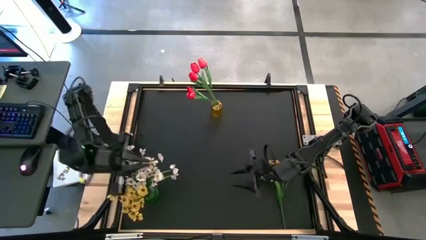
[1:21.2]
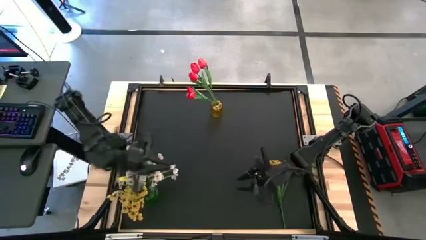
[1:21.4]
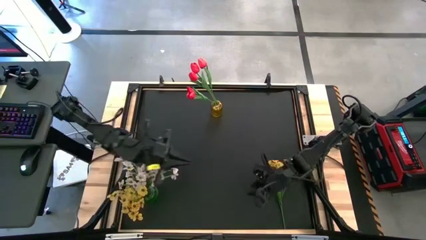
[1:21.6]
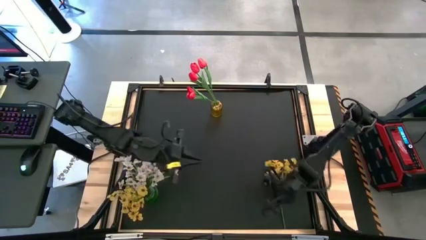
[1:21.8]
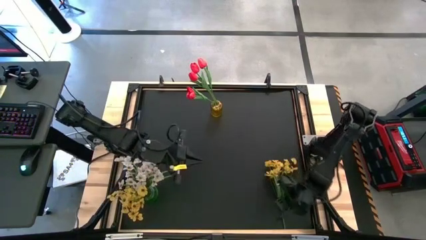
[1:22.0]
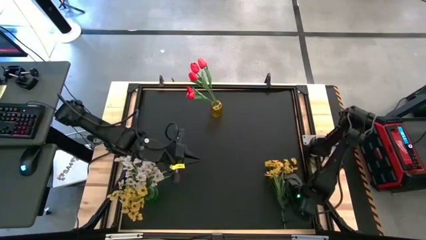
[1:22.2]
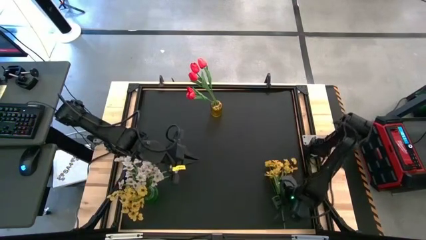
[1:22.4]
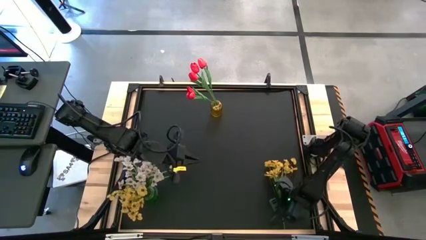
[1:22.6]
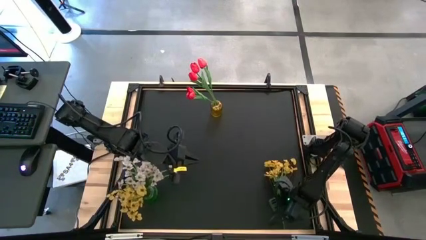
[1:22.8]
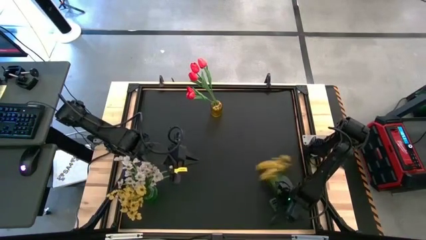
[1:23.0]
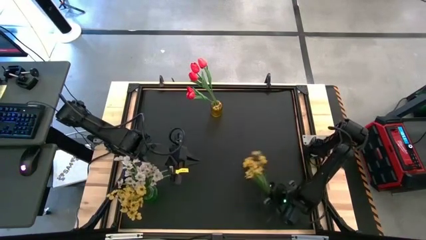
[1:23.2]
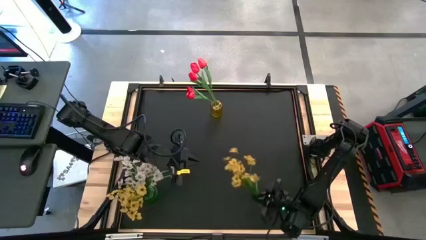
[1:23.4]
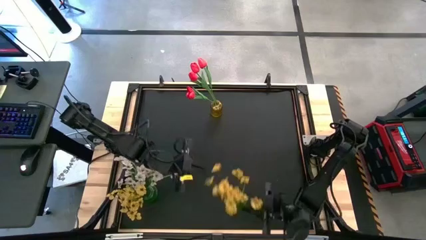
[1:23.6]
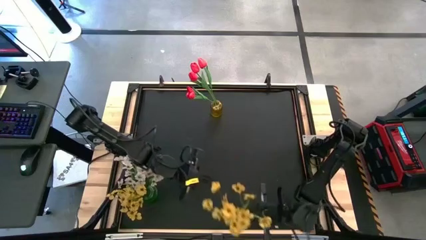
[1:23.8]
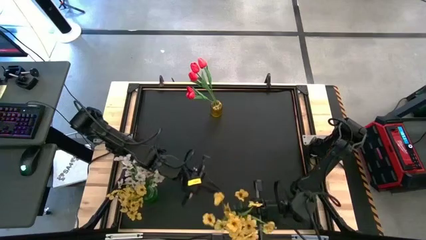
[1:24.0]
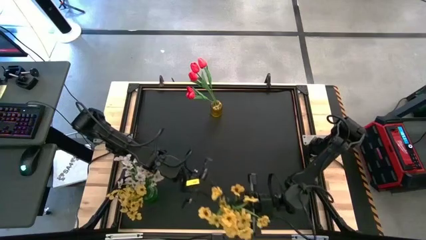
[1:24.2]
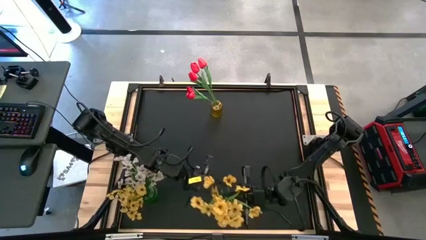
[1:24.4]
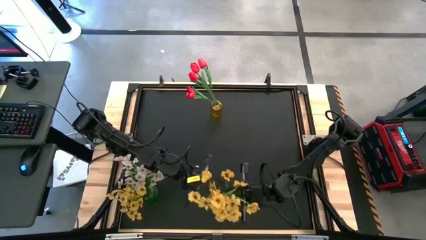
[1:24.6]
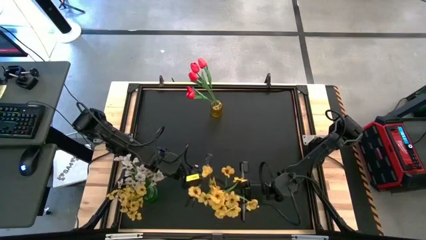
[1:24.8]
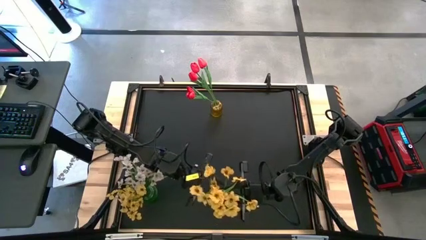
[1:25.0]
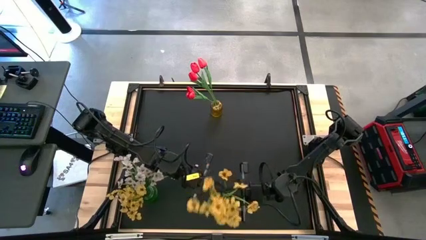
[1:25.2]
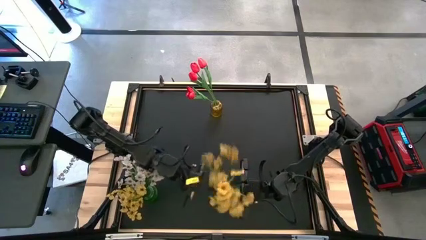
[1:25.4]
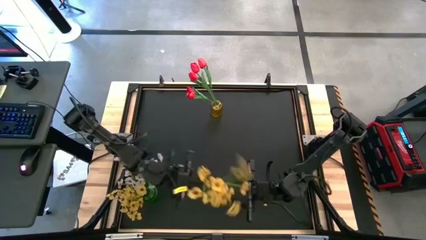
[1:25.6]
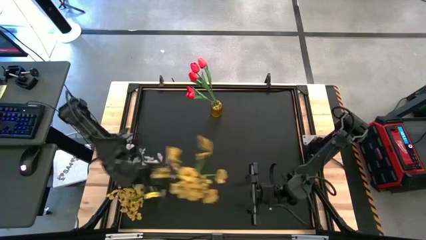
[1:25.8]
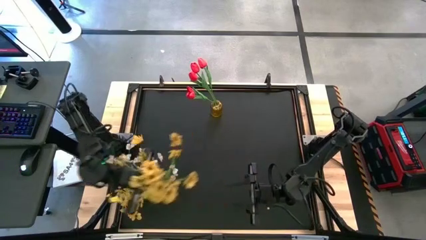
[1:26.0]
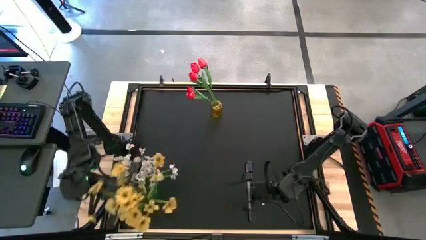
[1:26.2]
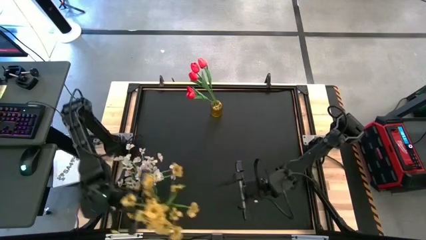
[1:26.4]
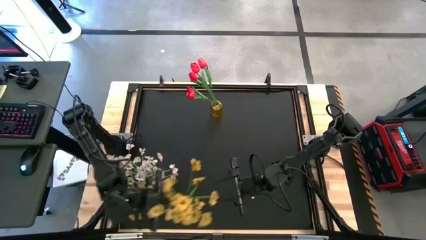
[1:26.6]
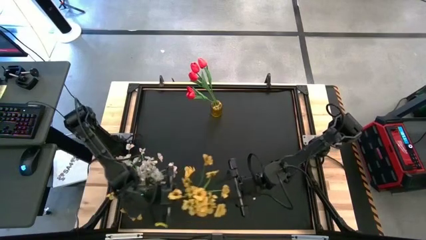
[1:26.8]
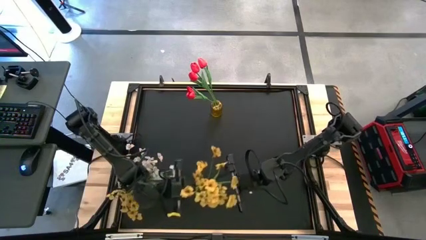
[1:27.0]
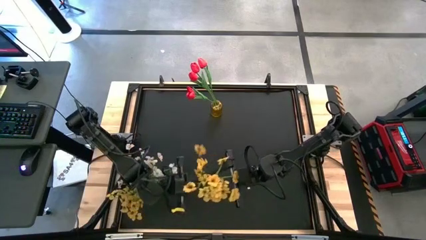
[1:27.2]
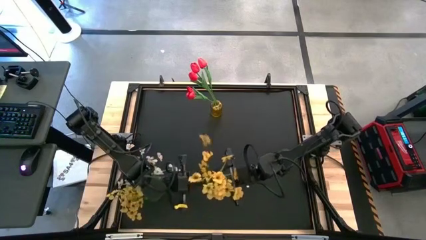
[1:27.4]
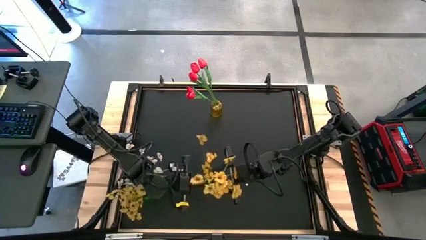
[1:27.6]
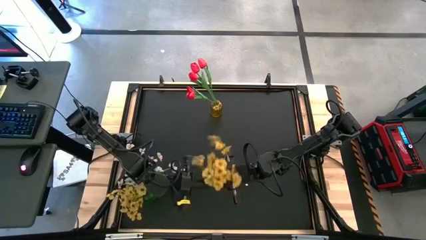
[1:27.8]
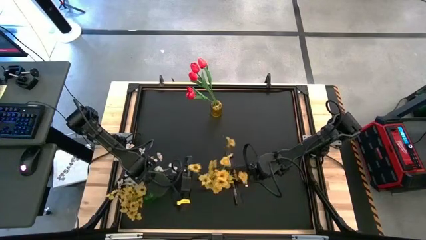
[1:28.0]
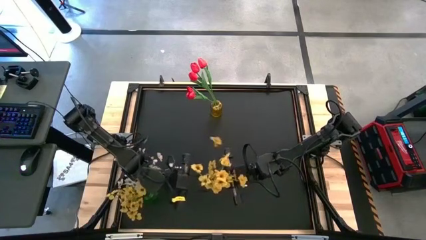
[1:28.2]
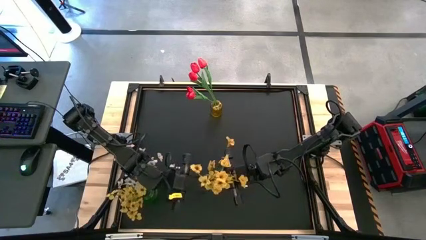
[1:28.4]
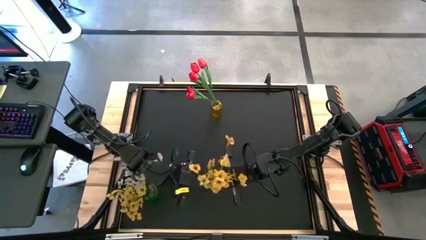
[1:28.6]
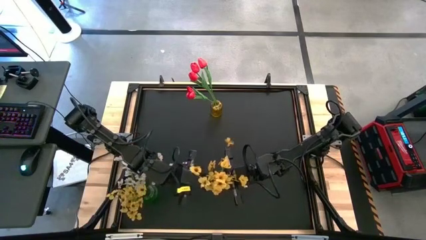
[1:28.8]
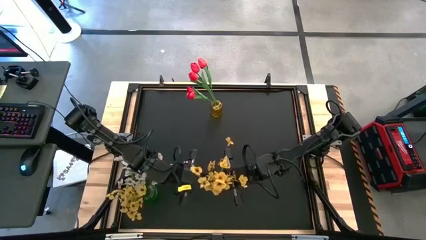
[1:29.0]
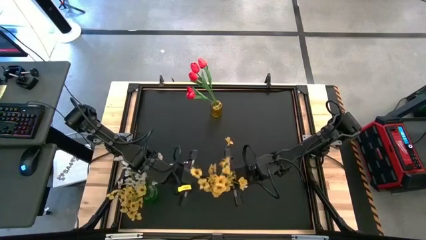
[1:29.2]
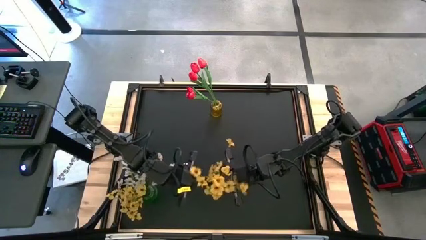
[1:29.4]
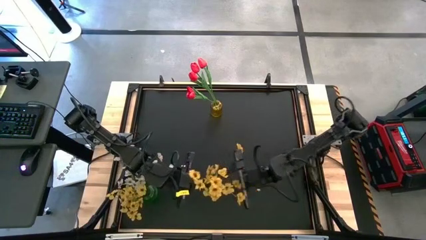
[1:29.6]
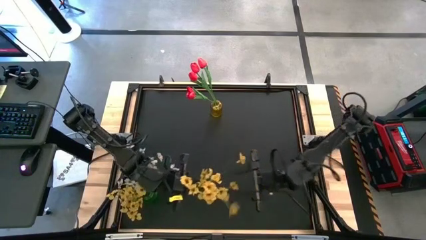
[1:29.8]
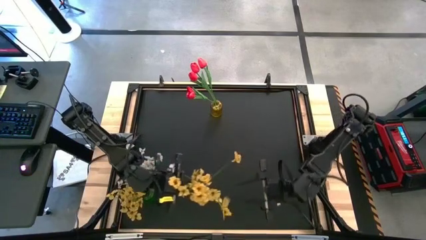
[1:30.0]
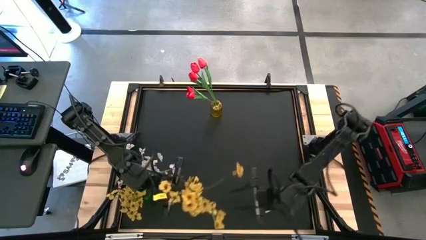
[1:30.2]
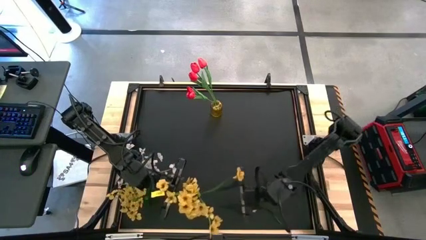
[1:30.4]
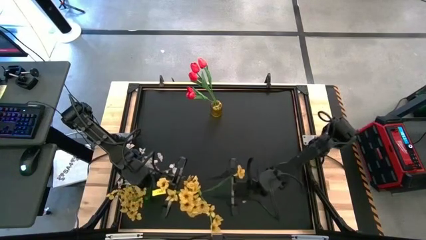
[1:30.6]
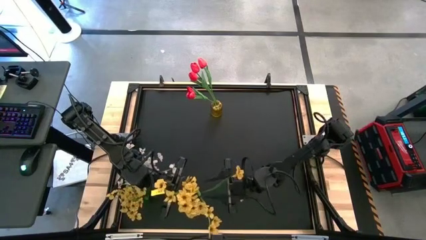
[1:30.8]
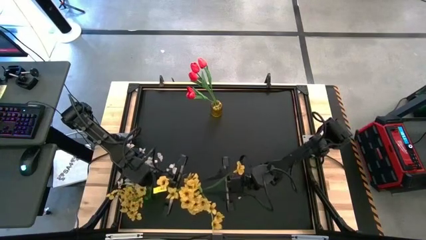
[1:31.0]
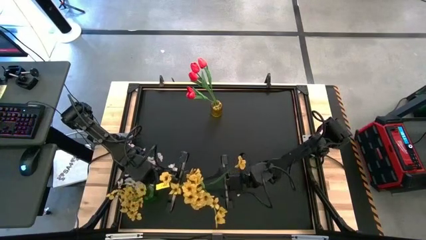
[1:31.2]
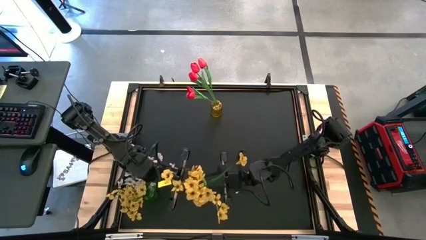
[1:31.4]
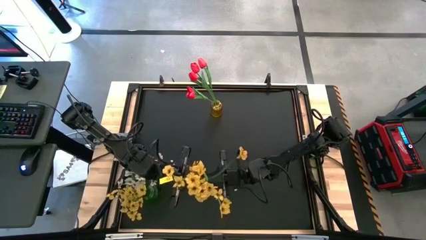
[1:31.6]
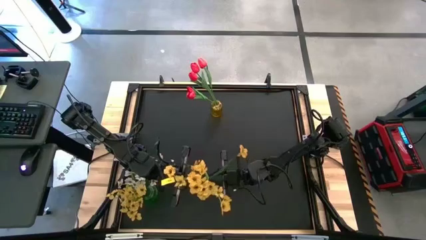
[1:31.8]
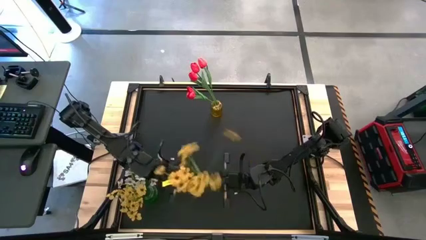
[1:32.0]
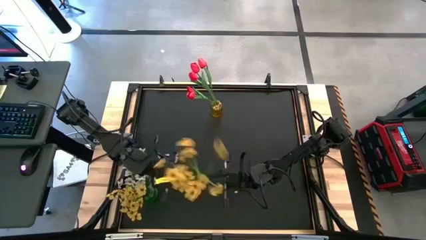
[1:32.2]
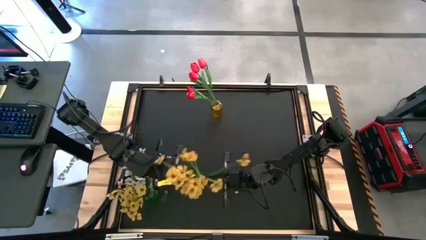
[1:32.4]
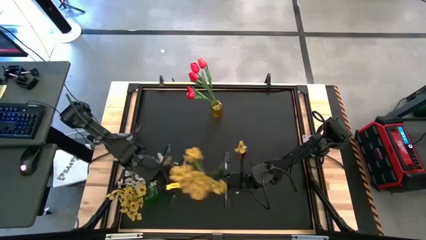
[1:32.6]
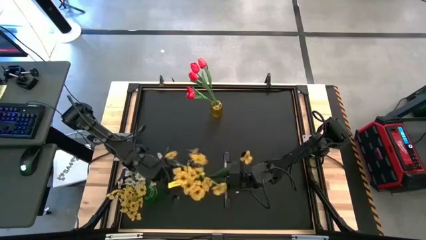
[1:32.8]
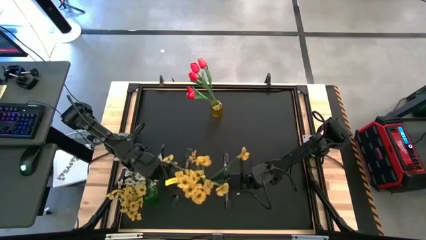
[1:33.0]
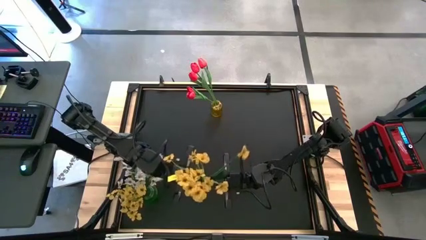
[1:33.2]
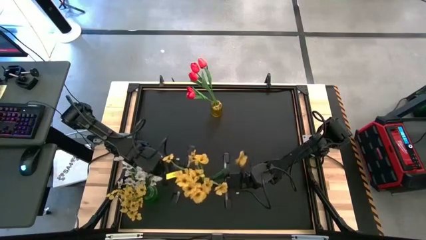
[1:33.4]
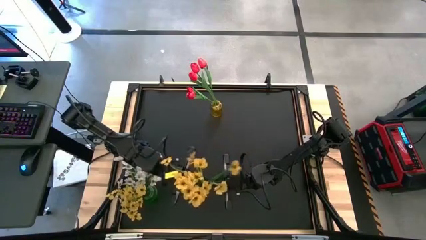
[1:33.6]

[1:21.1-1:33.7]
Task: Sort flowers into vase by color
Put the yellow flowers into the green vase

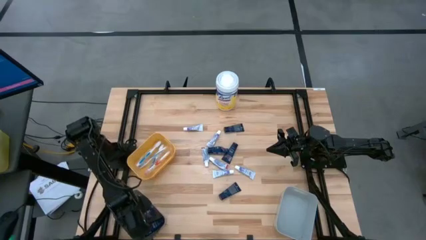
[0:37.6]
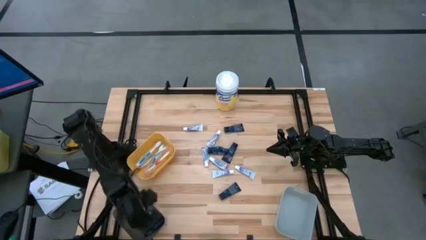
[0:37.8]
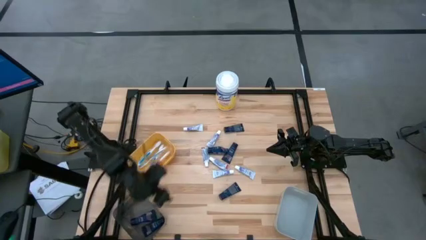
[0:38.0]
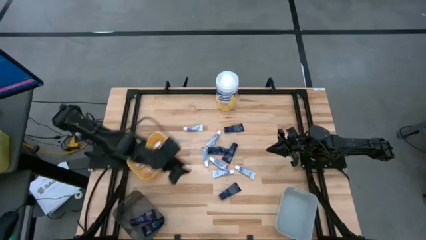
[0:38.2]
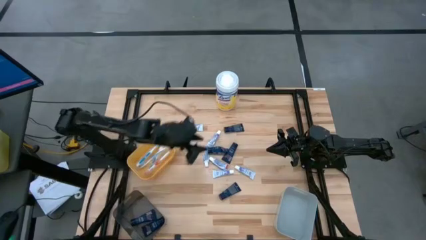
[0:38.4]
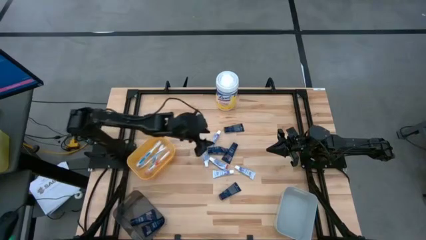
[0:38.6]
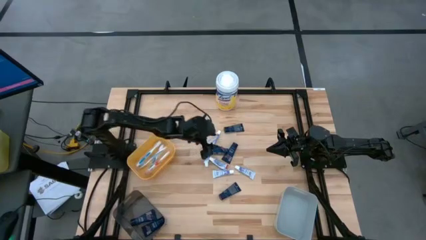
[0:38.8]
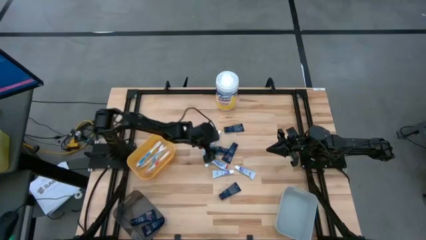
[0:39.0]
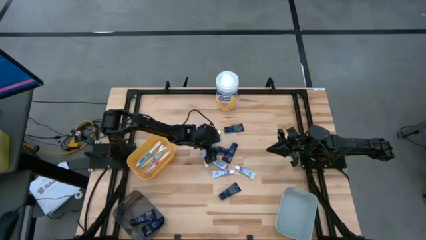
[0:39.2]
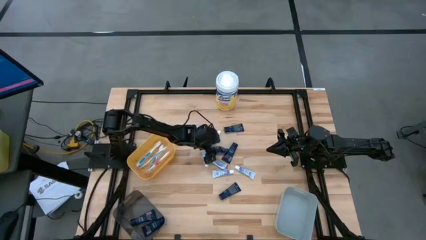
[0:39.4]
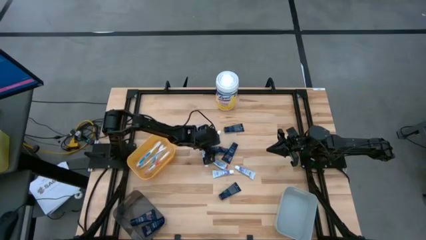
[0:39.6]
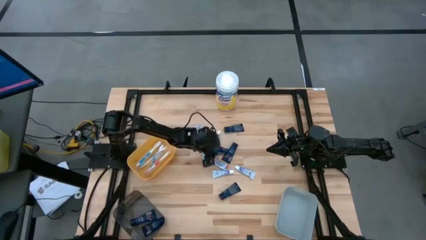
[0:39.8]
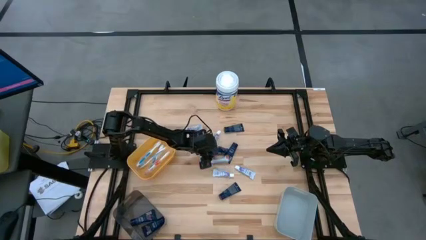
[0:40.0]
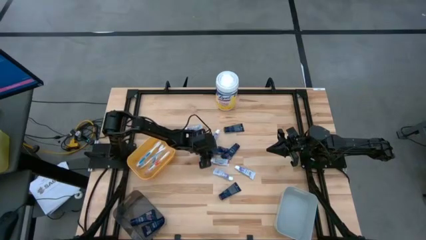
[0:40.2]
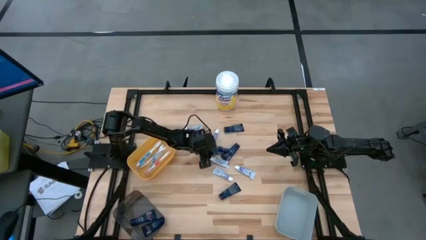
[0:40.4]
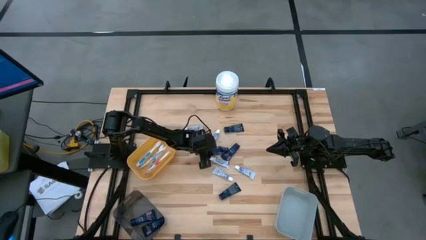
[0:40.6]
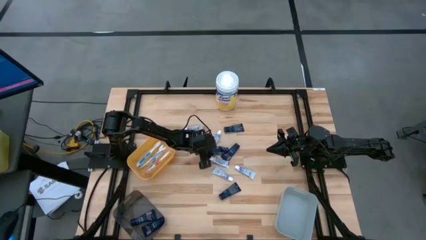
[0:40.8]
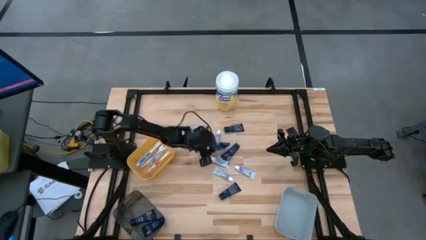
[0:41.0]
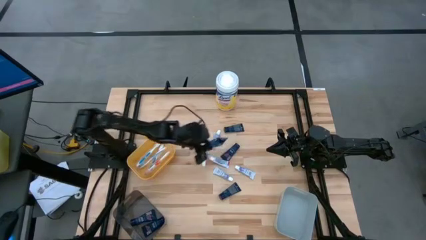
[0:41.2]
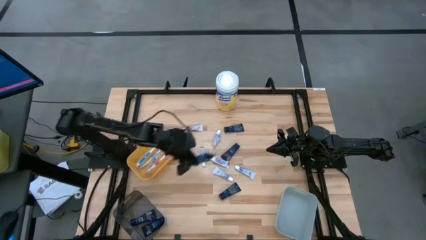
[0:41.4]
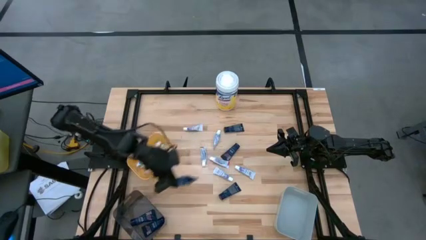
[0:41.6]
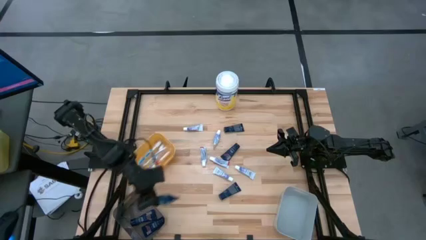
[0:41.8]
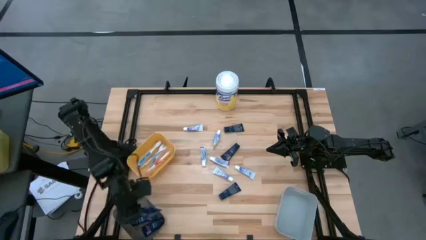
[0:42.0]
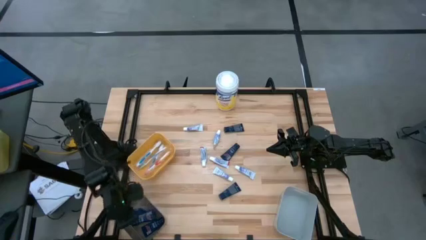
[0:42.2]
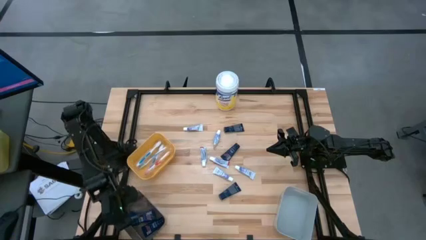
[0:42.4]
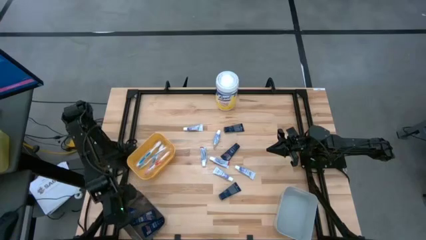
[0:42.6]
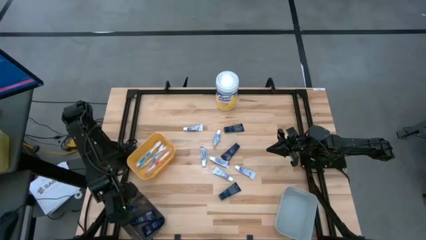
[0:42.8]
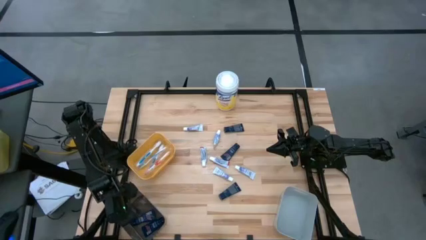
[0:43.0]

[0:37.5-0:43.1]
Task: Pick & Place Travel size toiletries
Put the blue shave cream into the black transparent bin
